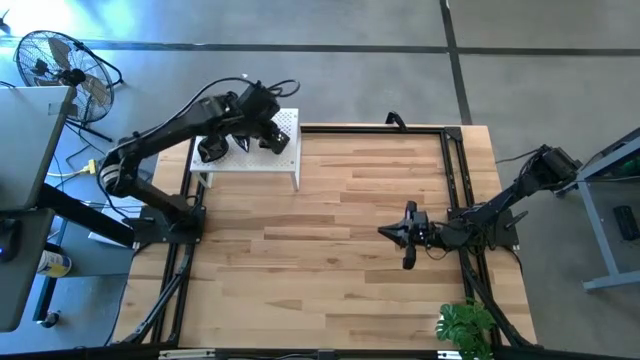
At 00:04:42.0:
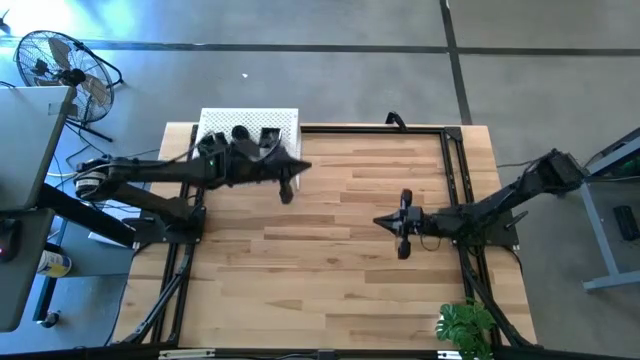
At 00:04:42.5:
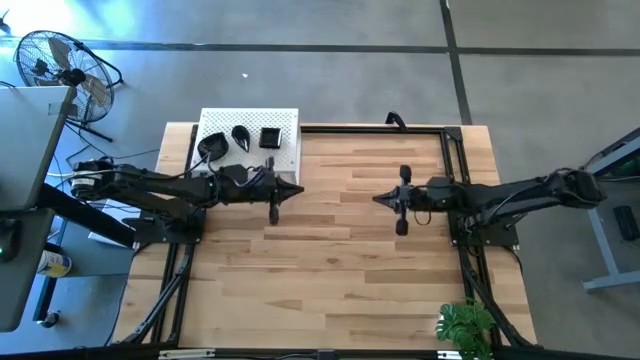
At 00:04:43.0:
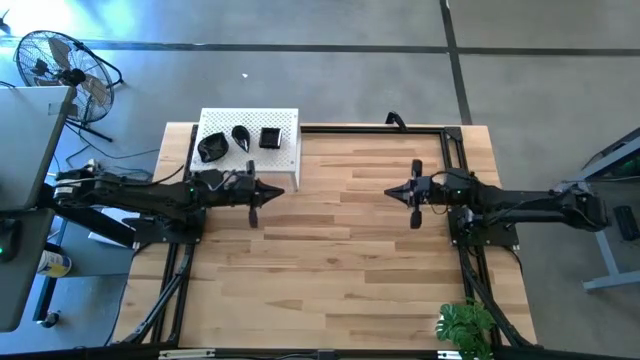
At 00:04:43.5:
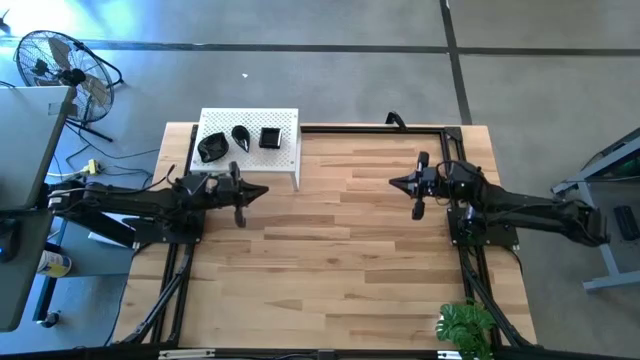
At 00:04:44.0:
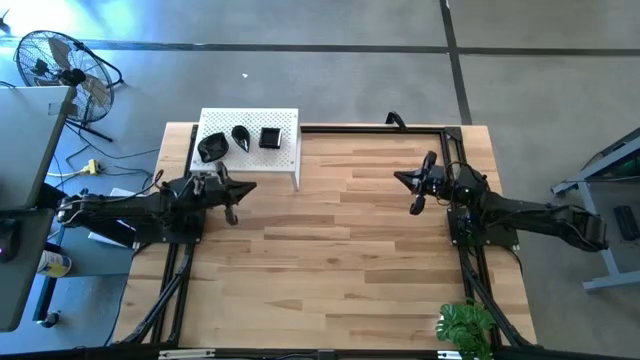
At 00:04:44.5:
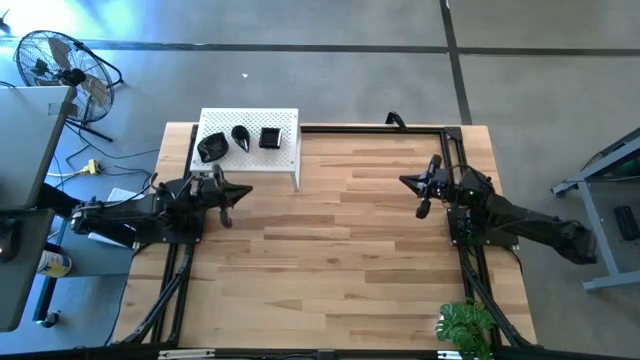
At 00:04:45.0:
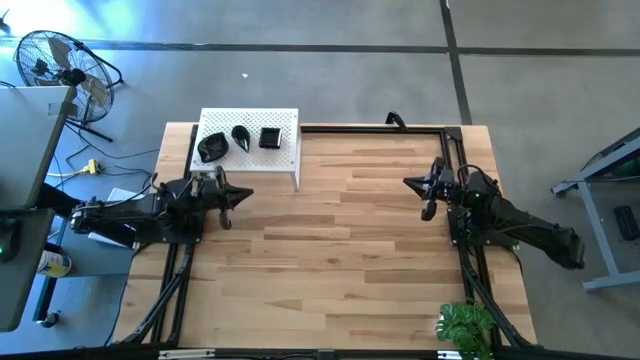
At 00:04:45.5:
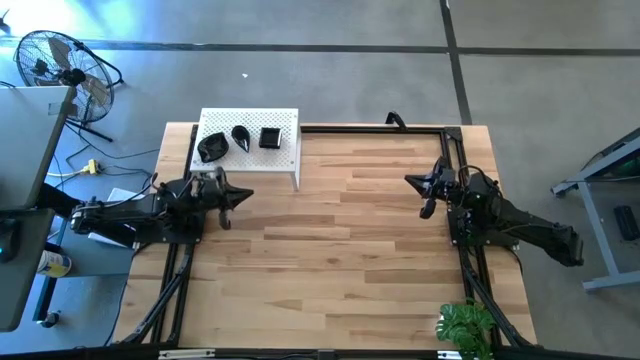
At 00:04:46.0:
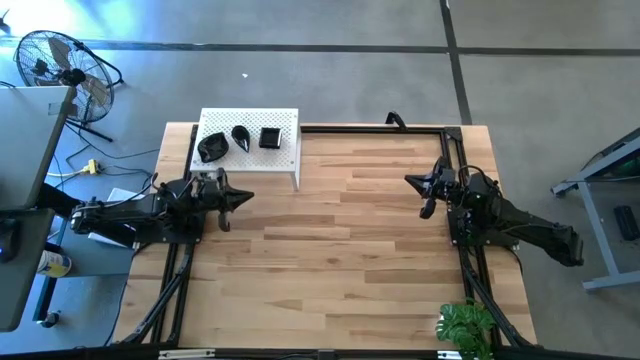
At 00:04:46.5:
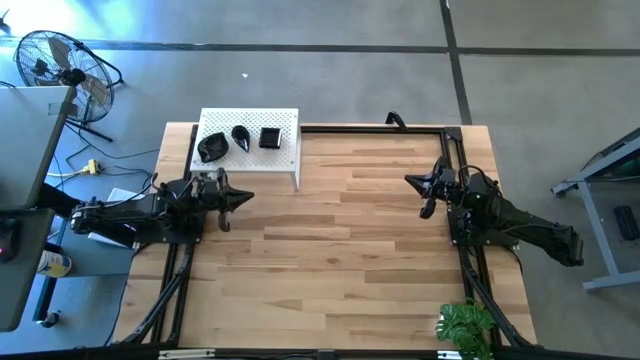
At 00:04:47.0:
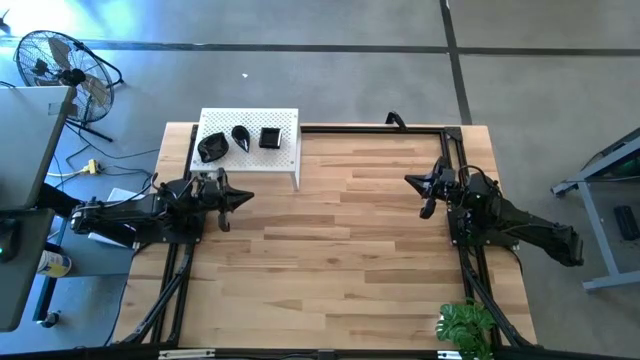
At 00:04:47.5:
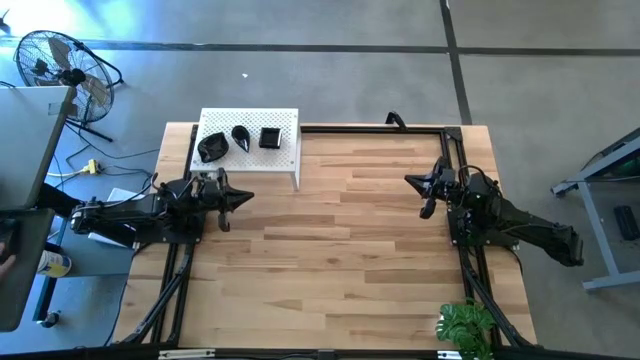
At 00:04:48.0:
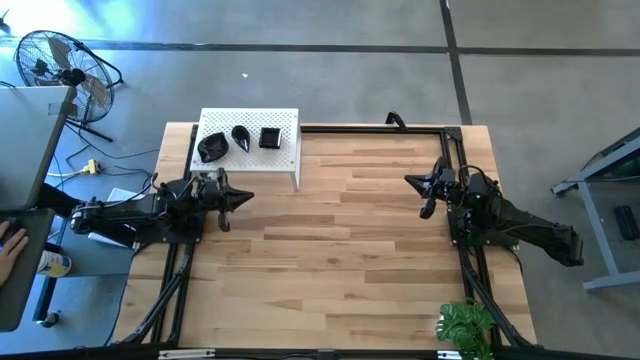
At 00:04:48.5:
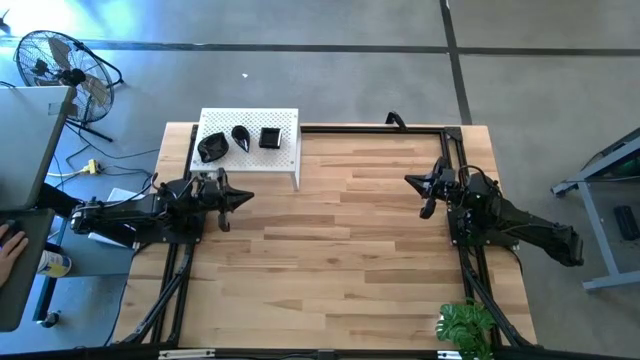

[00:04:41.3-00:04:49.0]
Task: Pick & Place Mini shaped plates
Return to Home Position

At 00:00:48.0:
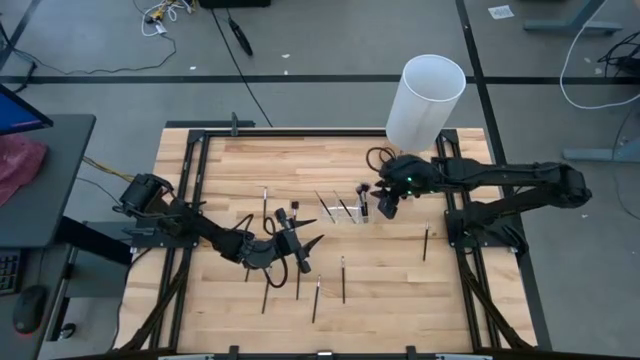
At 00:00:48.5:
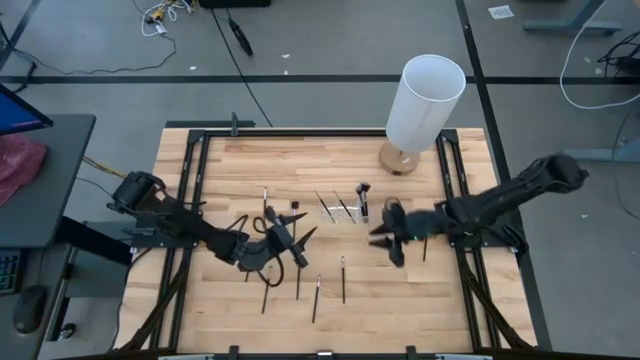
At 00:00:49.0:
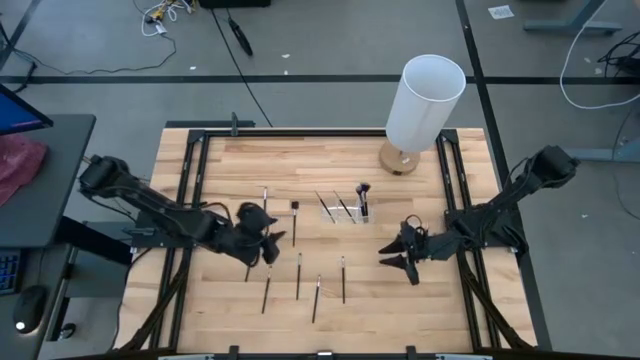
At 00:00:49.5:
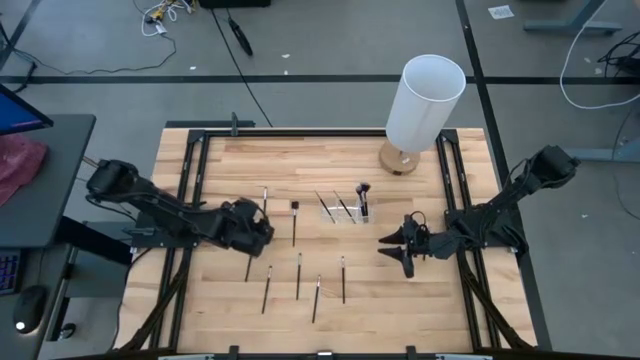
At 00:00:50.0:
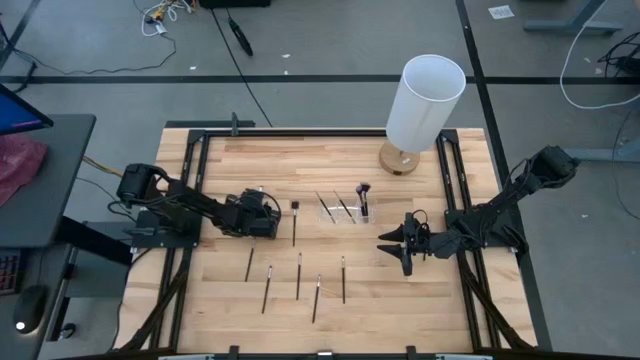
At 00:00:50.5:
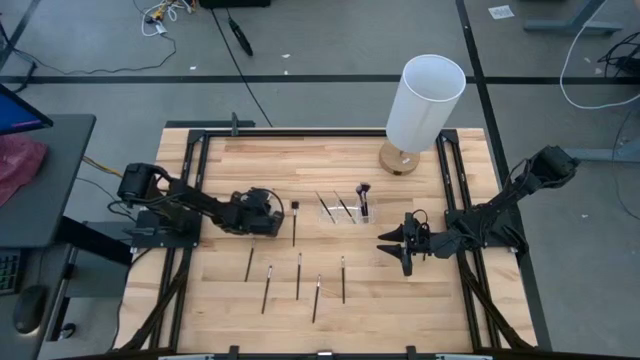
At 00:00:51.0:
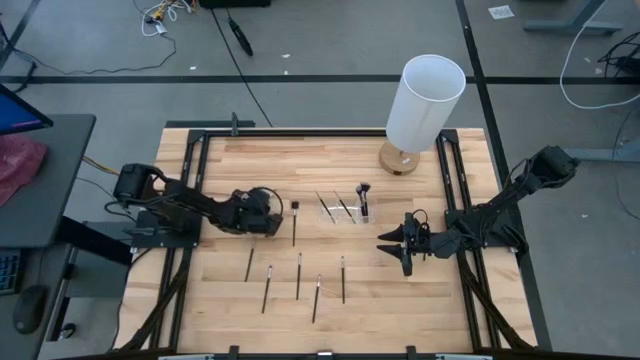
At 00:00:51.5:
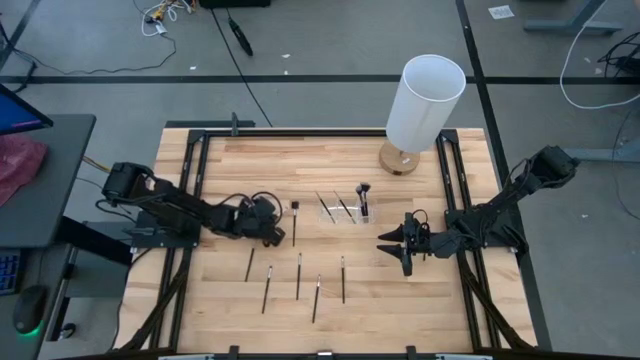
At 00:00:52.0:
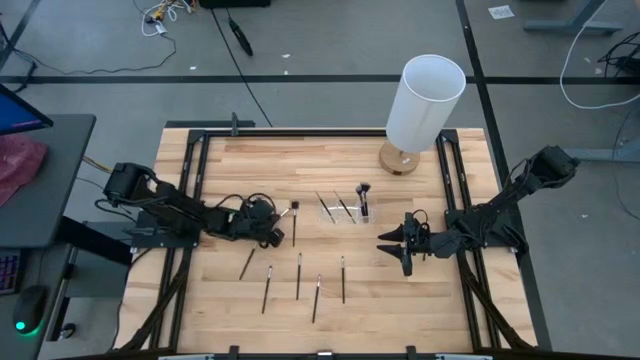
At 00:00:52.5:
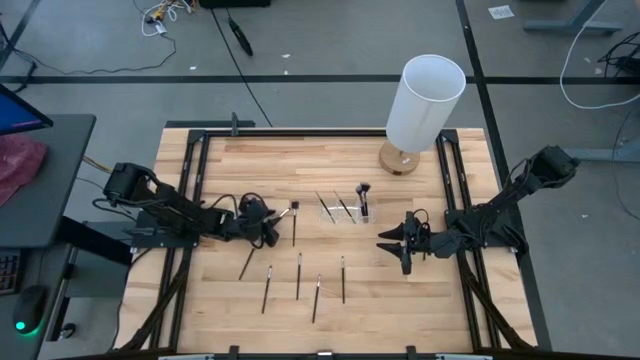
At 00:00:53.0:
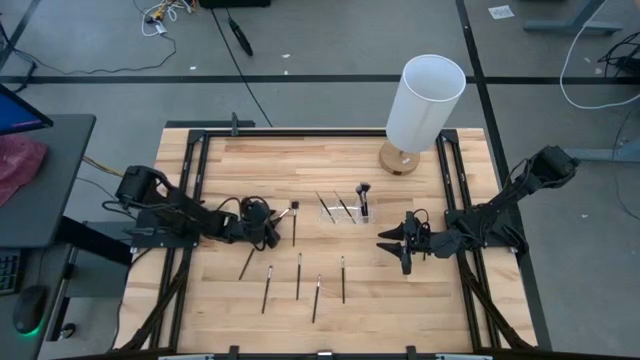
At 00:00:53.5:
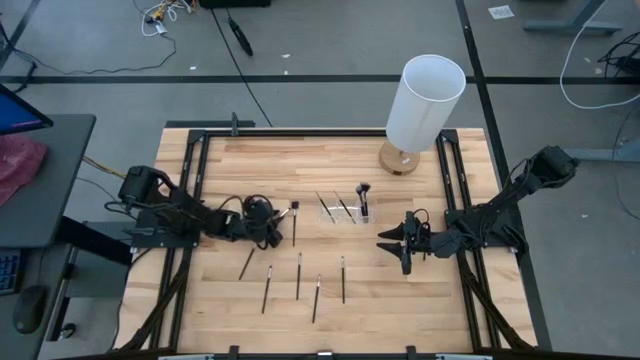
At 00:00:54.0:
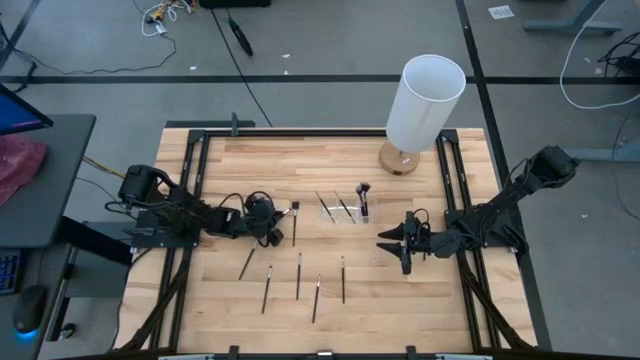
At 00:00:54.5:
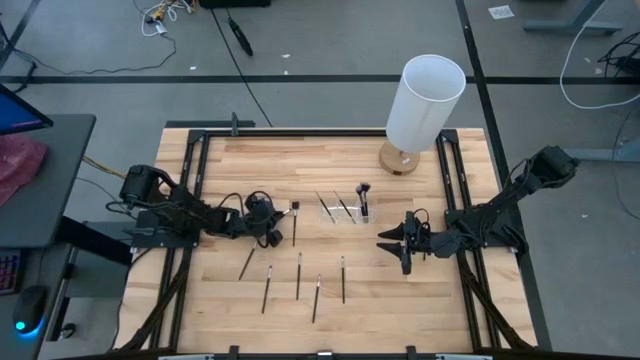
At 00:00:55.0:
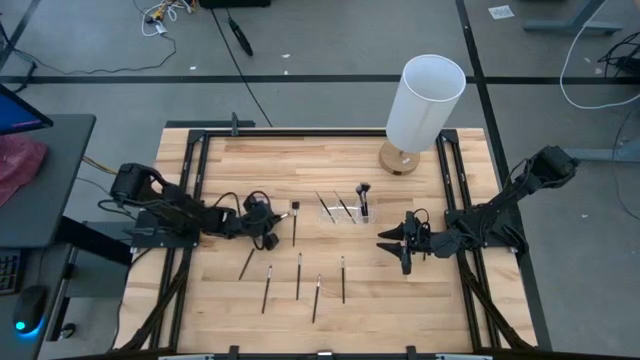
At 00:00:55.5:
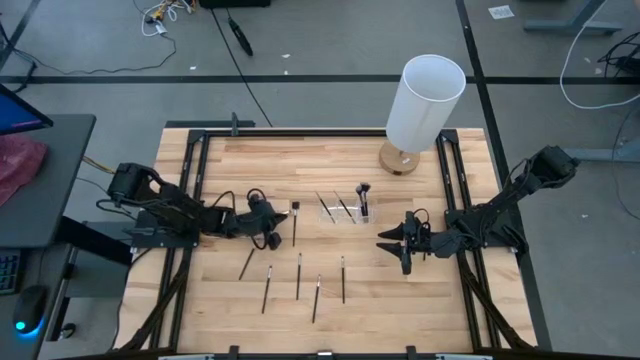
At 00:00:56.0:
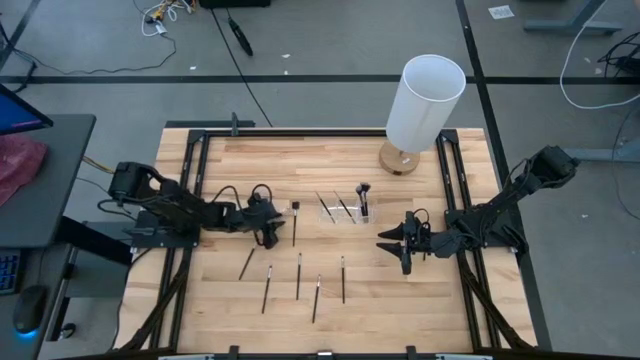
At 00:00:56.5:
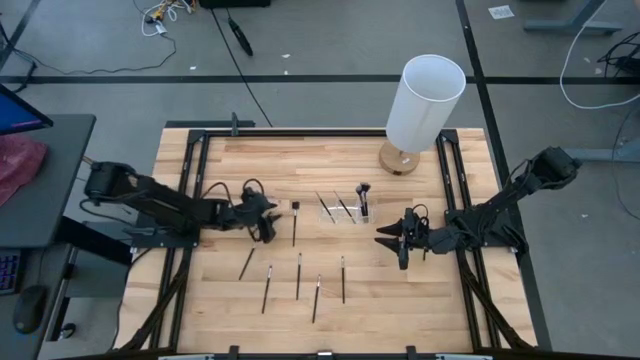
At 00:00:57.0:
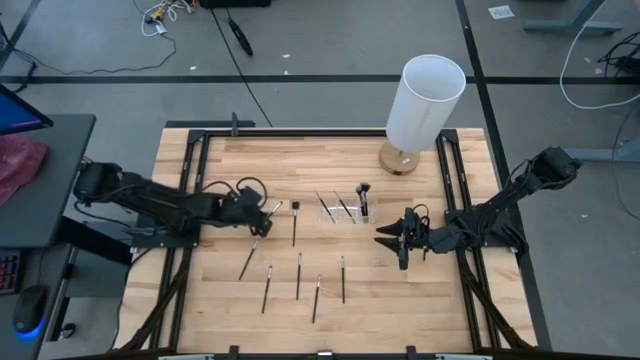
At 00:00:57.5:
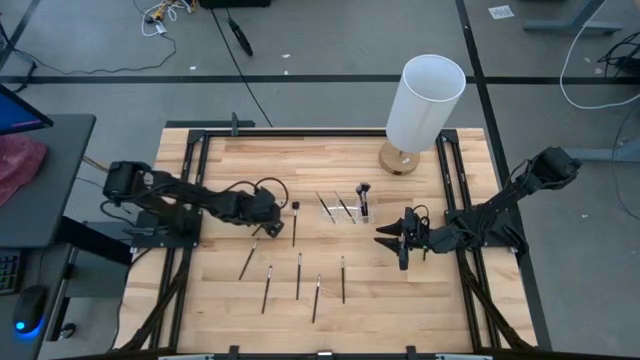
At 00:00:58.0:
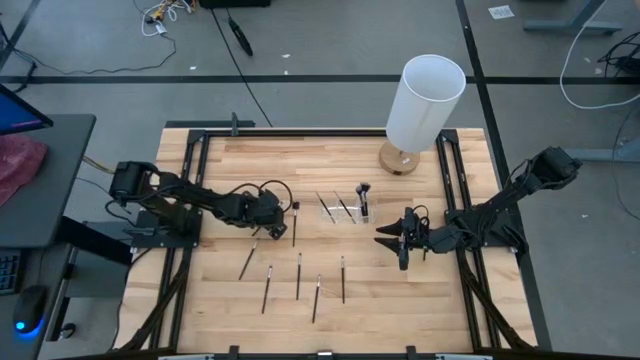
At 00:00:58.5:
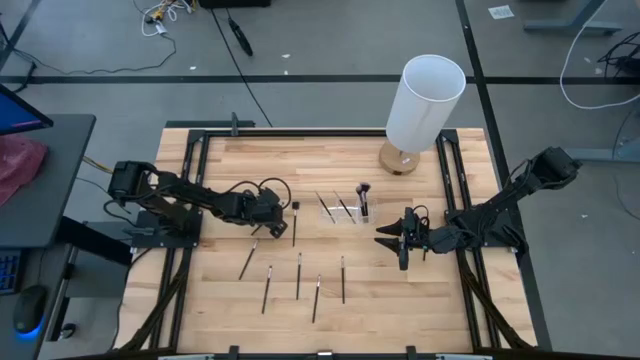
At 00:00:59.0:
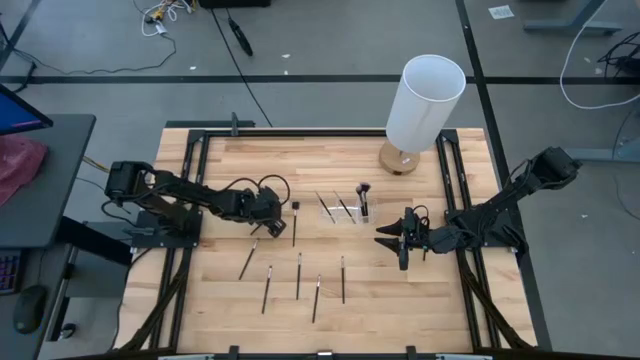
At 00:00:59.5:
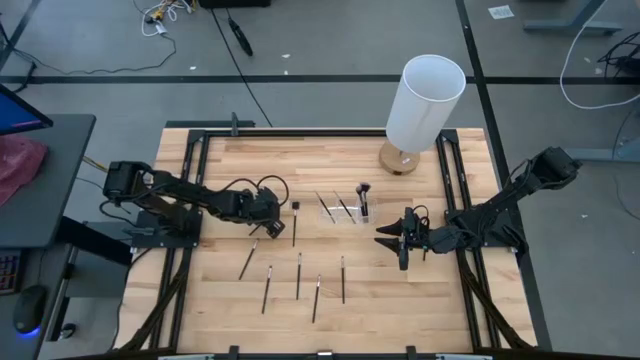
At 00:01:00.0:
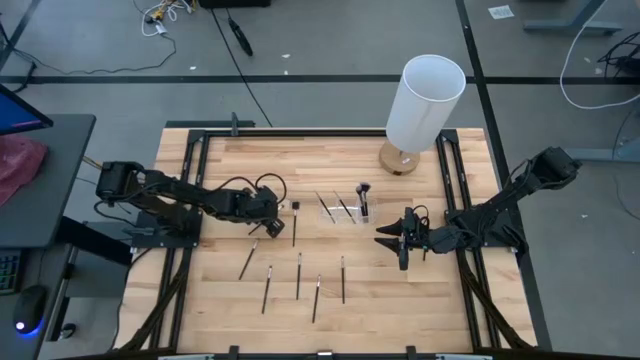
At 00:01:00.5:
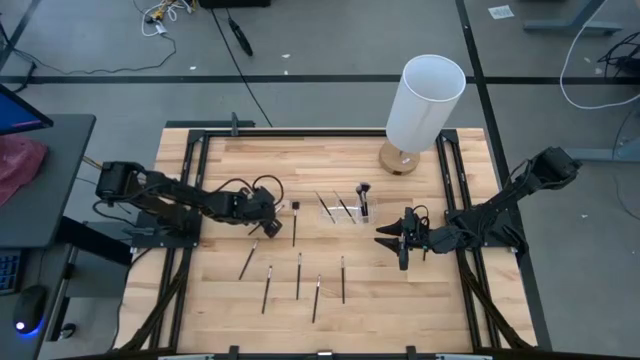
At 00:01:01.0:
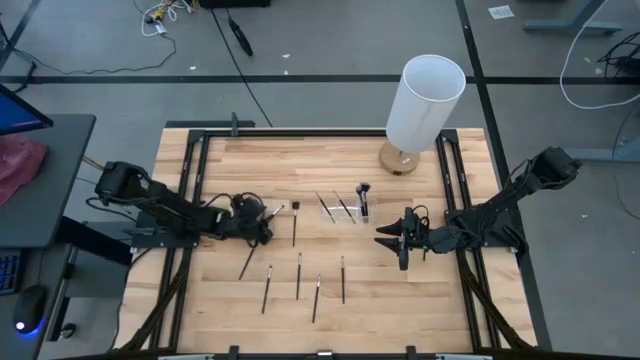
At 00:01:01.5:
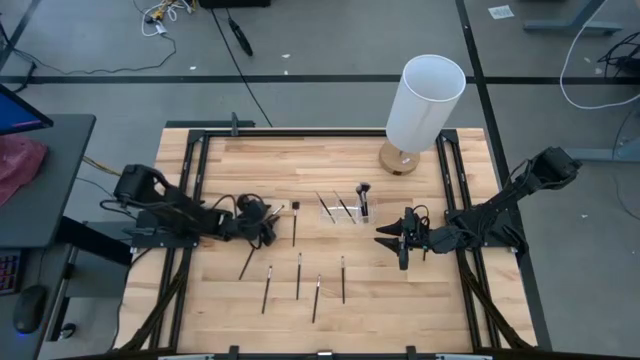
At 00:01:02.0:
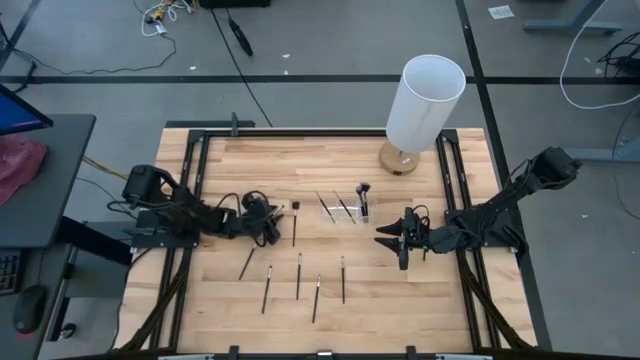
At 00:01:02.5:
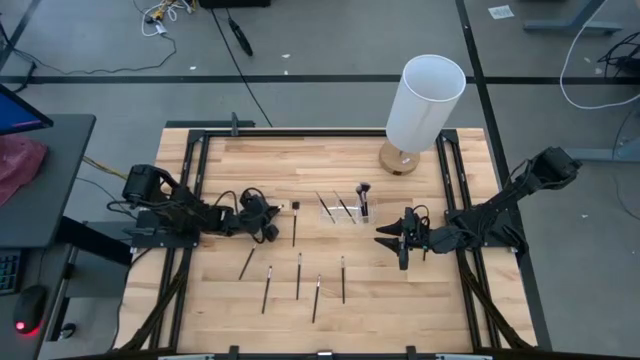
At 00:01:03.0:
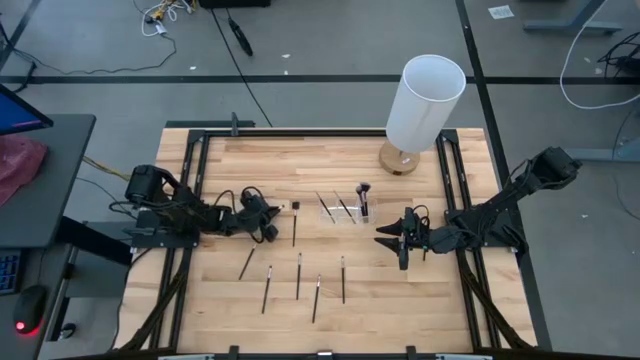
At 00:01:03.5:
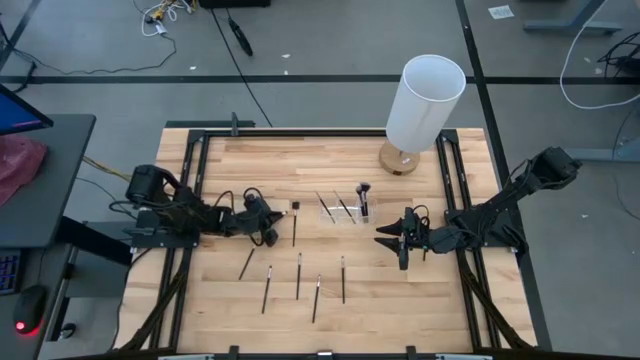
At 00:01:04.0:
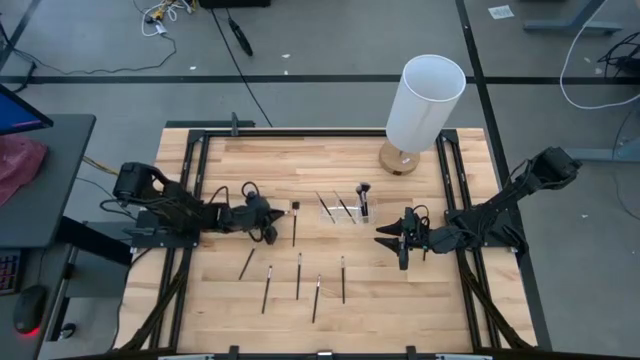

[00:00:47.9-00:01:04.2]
Task: Pick & Place Makeup Supplies
Put the black makeup brush into the transparent organizer
